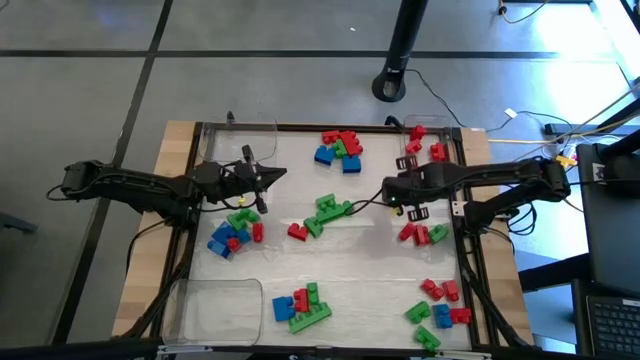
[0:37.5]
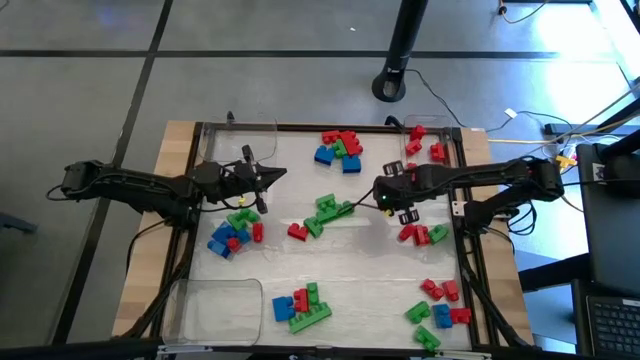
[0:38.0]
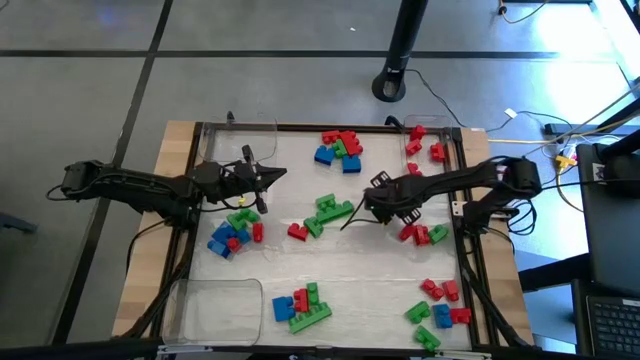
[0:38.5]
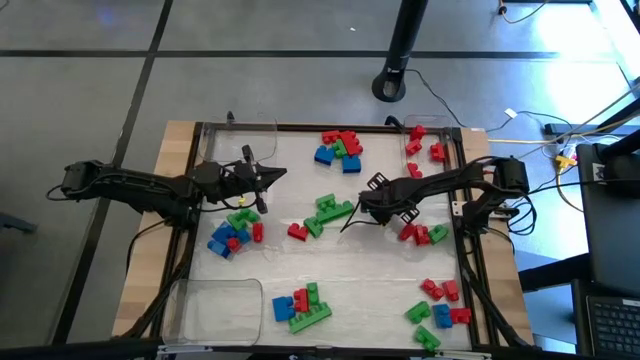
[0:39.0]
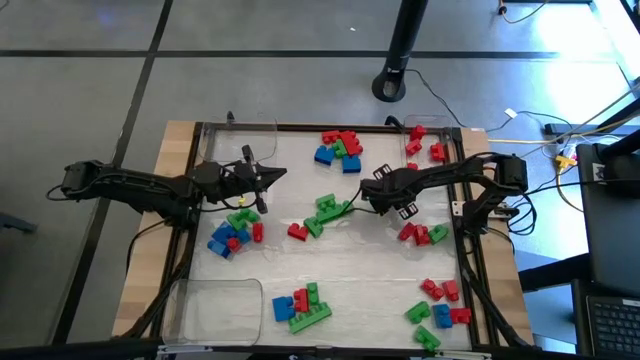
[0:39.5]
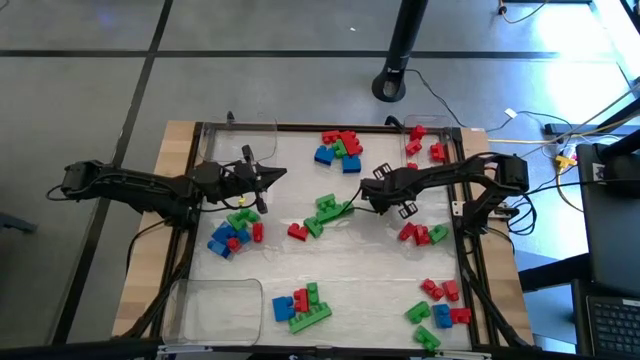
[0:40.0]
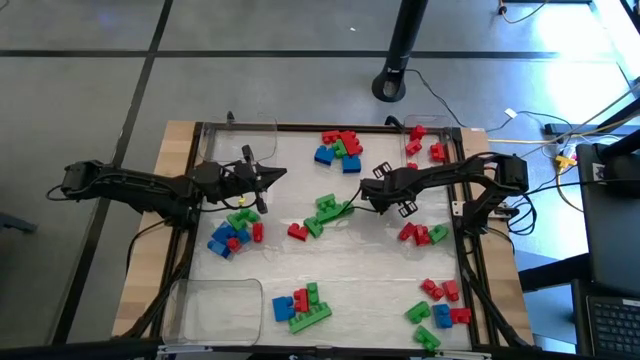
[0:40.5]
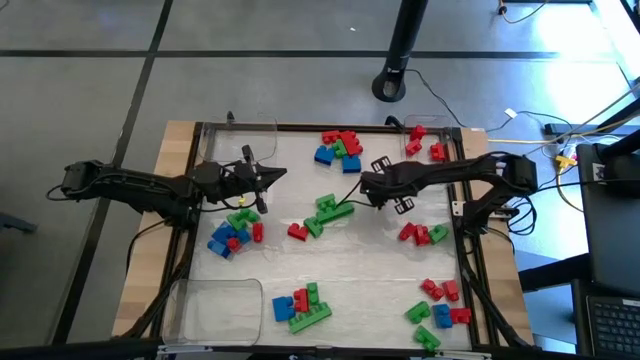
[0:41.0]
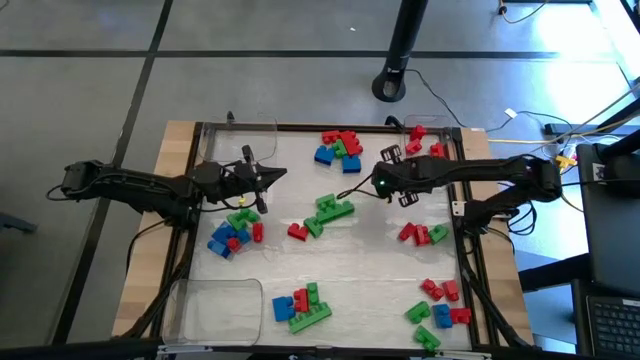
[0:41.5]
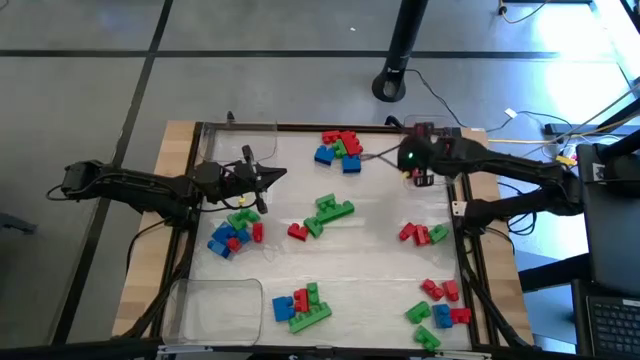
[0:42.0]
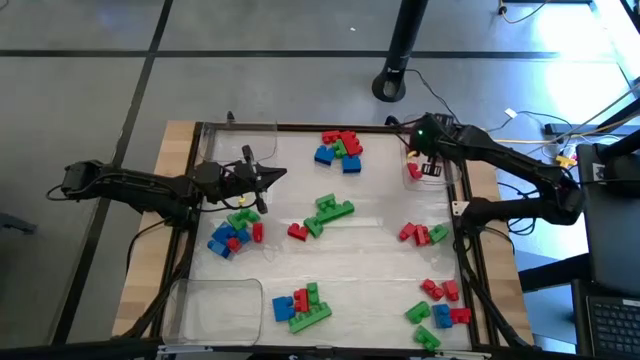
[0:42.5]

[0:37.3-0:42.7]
Task: Sort blocks
Put the red game piece into the right transparent bin

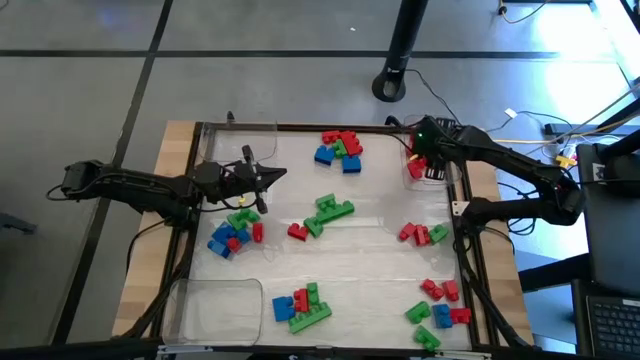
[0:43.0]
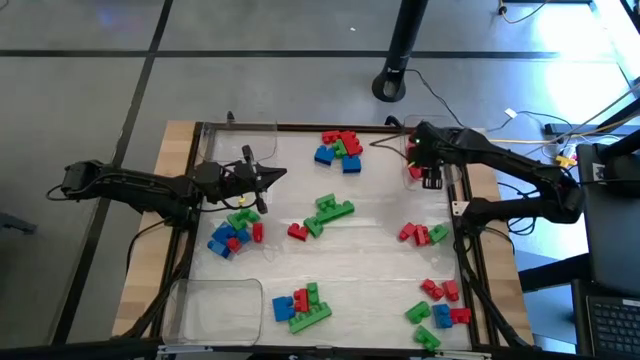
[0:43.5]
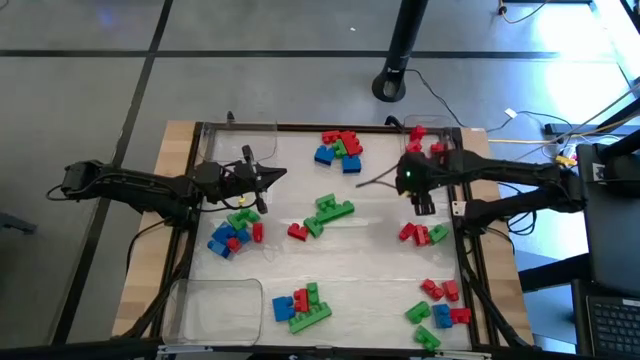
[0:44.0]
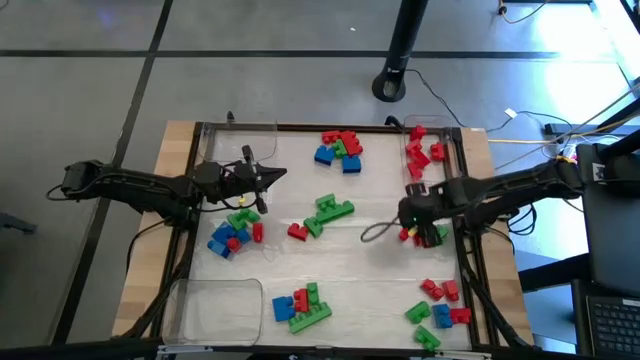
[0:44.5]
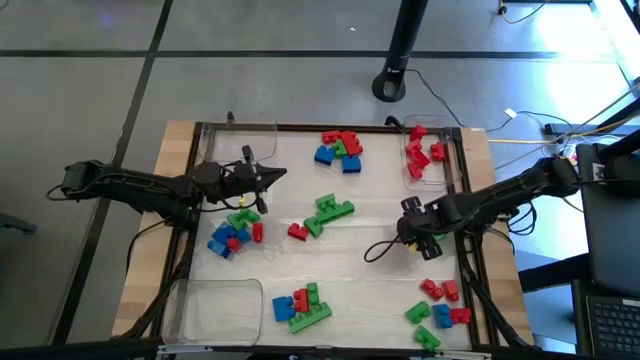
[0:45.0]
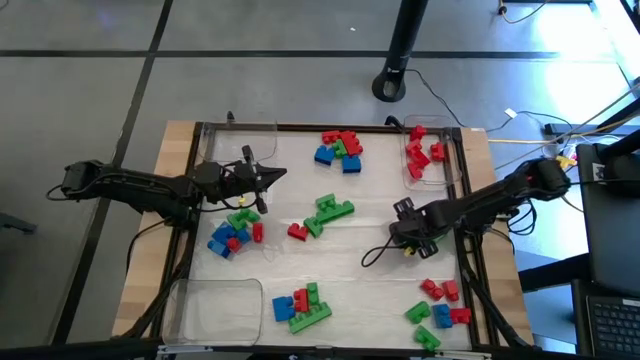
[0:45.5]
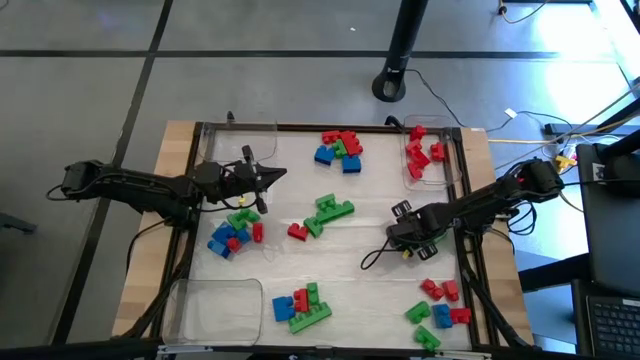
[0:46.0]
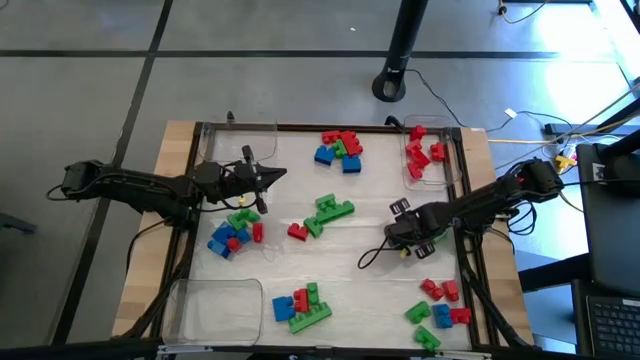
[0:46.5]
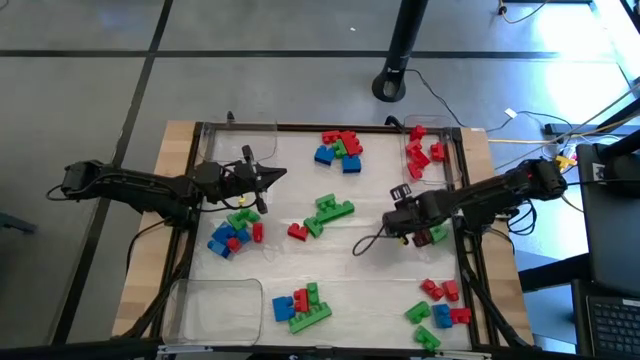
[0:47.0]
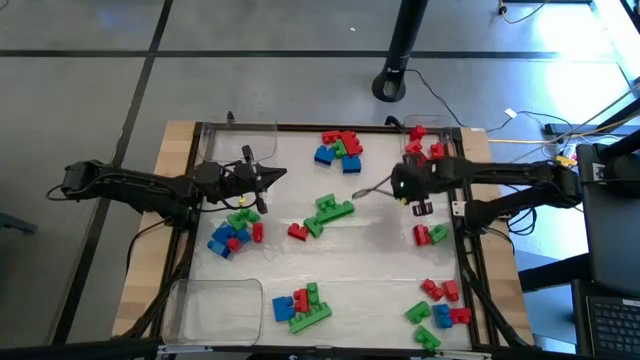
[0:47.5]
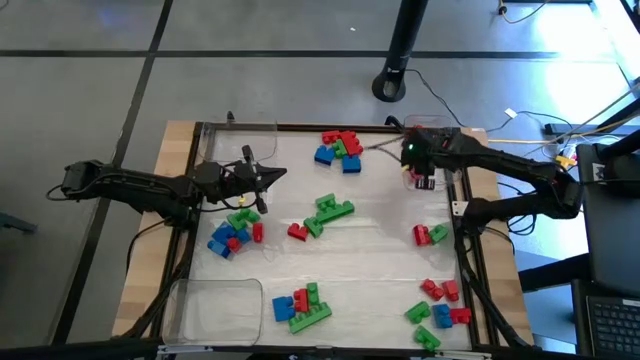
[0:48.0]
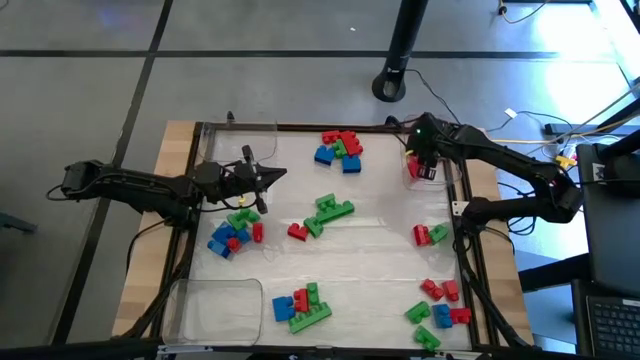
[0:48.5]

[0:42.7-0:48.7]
Put the red game piece into the right transparent bin

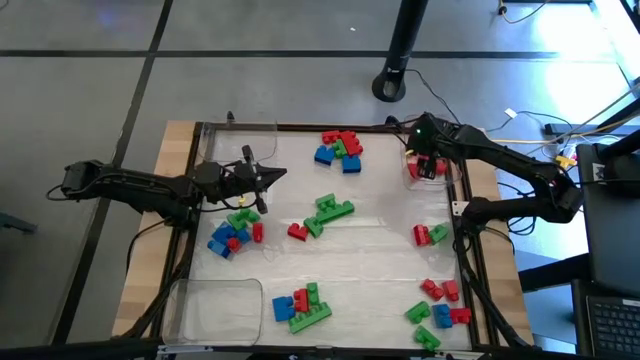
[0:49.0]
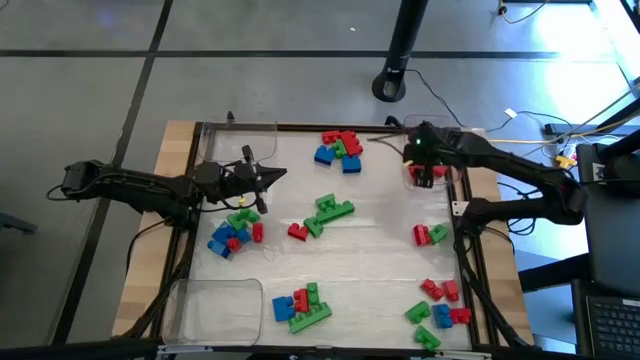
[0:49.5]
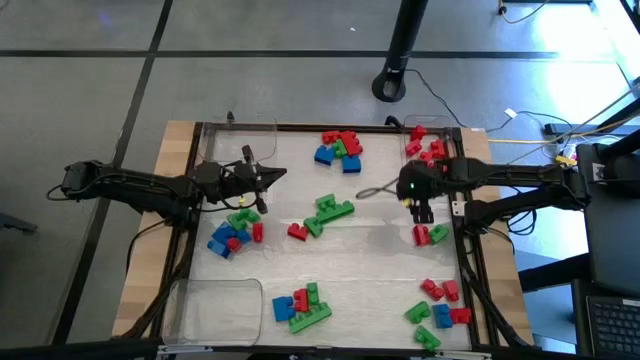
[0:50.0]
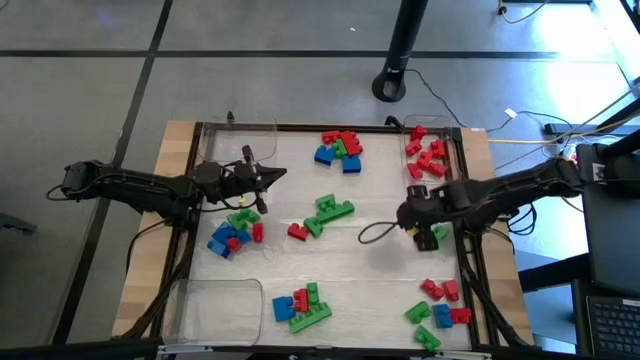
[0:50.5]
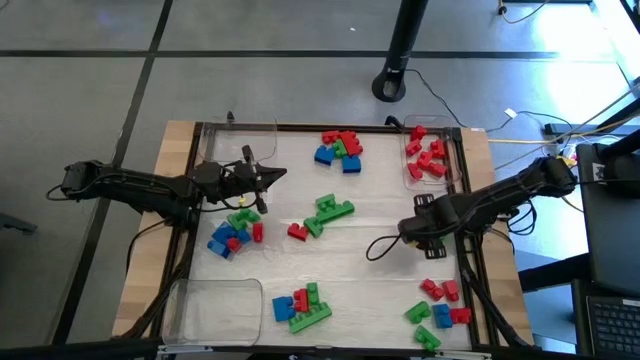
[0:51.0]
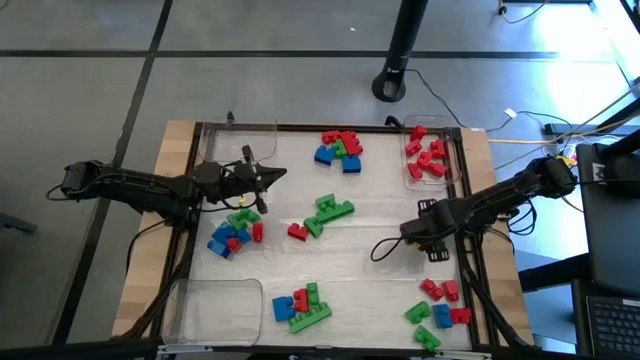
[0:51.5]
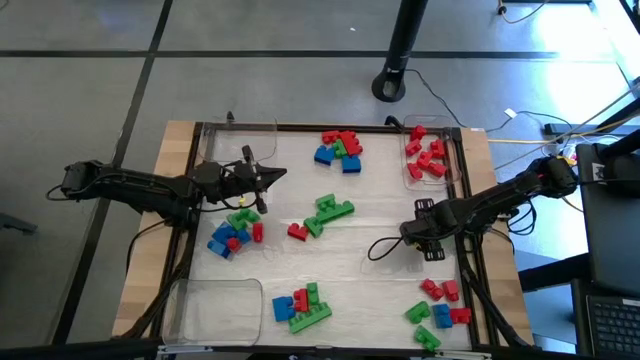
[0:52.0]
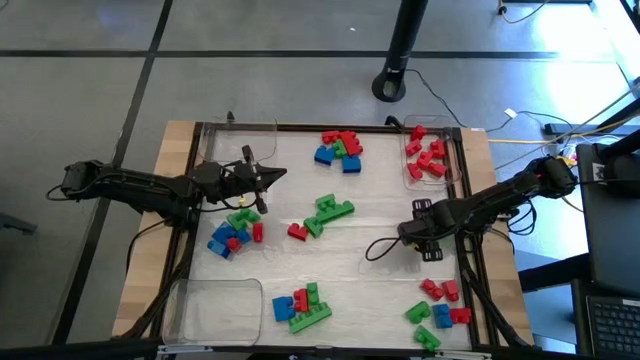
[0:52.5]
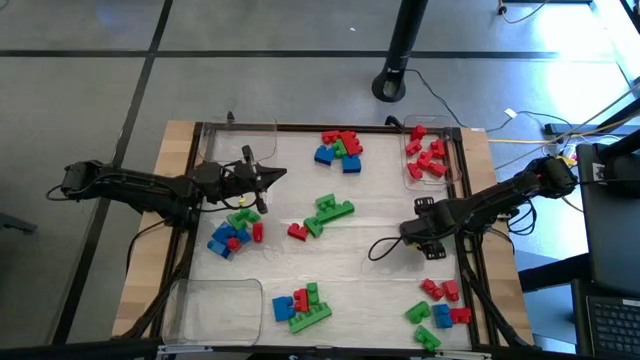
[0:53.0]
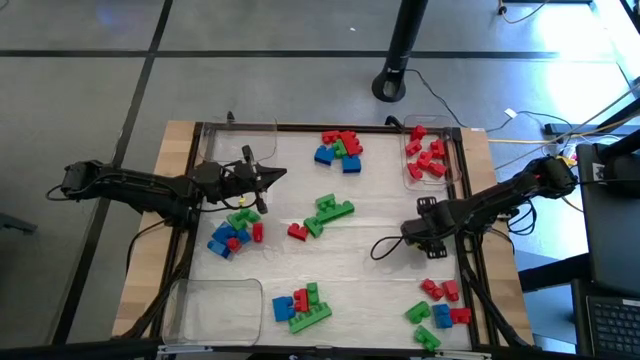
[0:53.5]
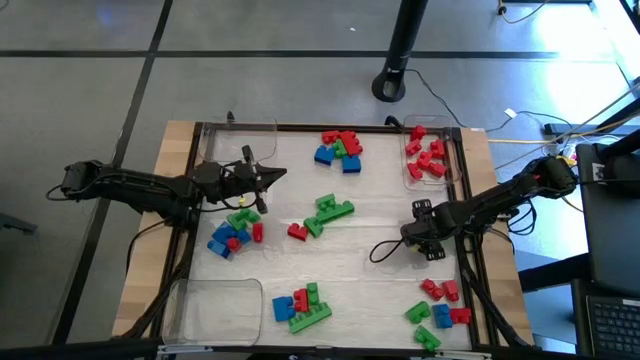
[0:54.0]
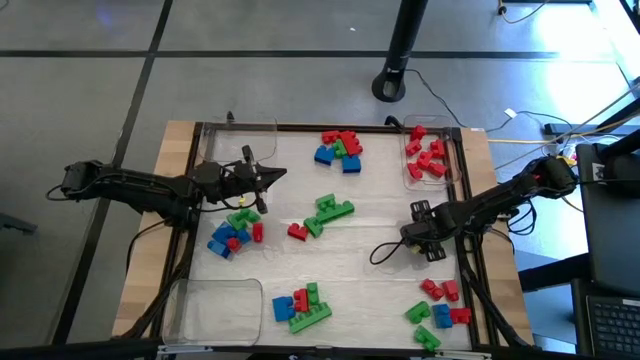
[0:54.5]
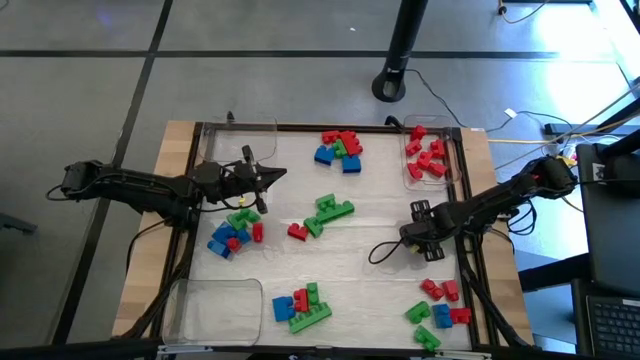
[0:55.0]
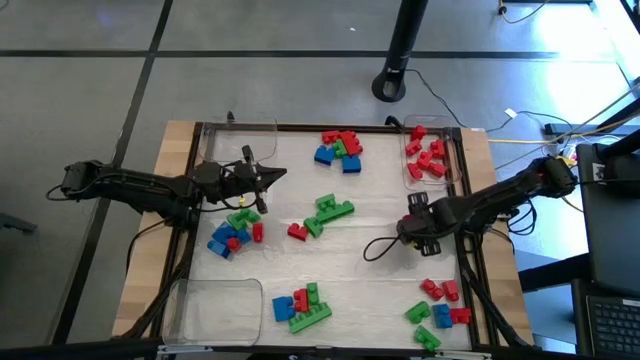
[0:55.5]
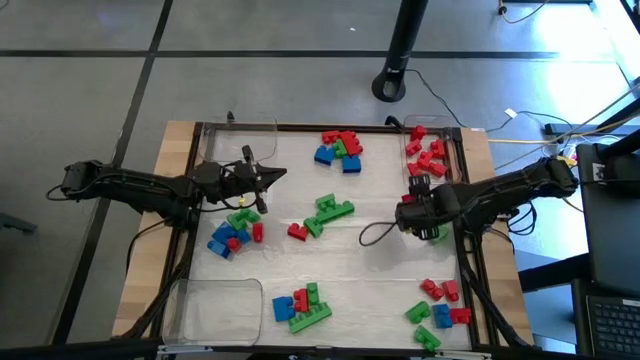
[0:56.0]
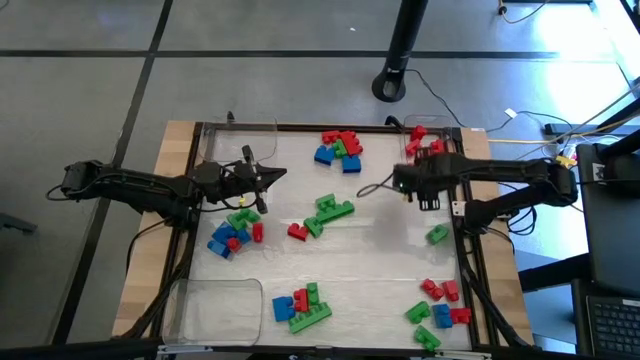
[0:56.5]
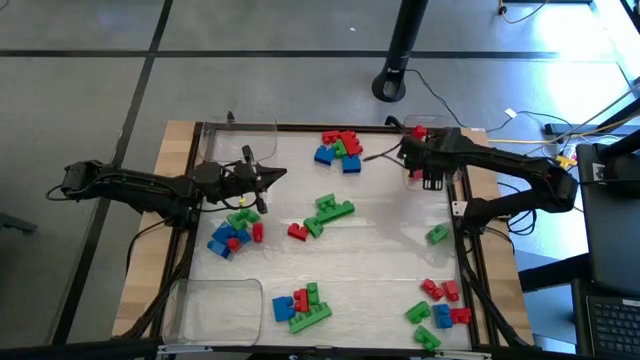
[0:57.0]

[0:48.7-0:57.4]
Put the red game piece into the right transparent bin
